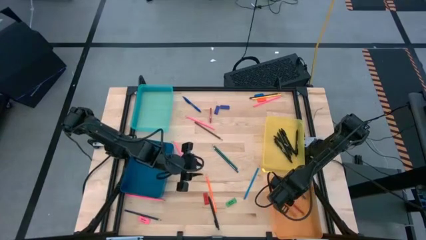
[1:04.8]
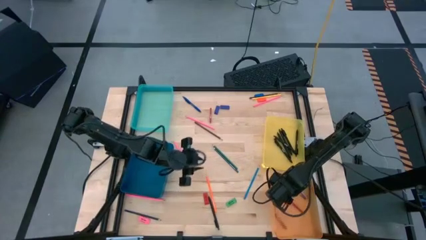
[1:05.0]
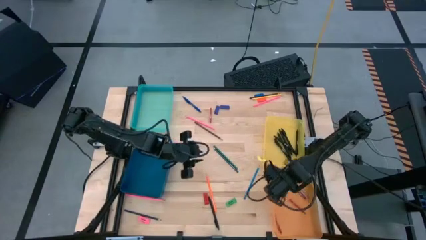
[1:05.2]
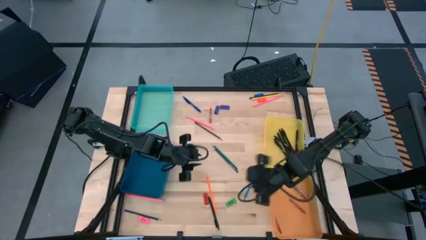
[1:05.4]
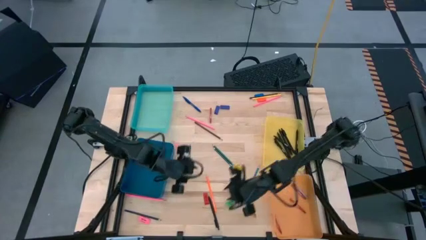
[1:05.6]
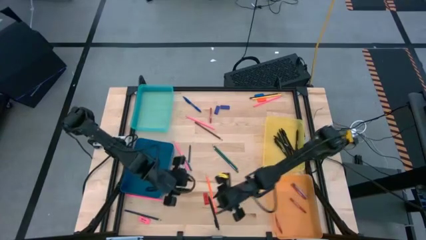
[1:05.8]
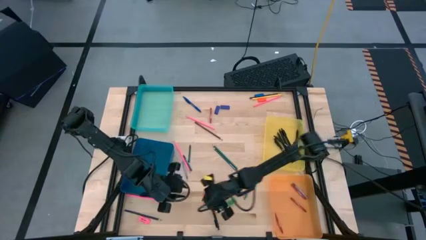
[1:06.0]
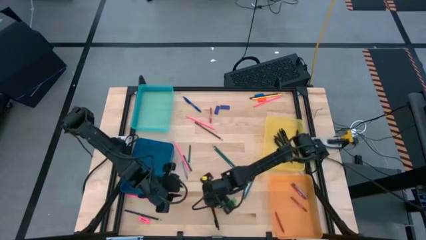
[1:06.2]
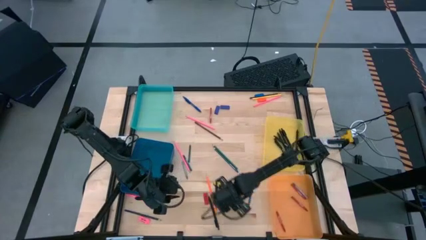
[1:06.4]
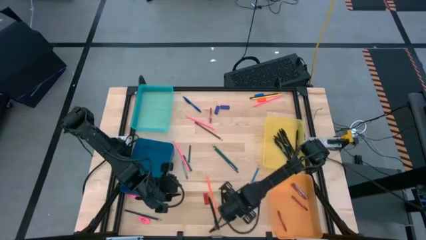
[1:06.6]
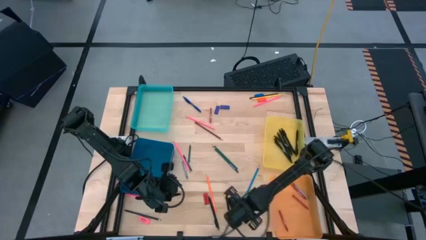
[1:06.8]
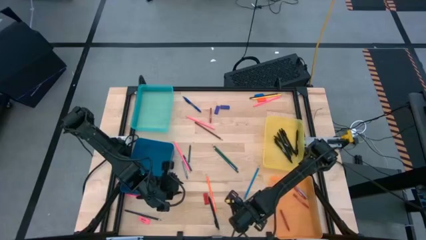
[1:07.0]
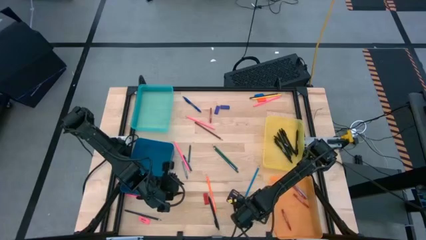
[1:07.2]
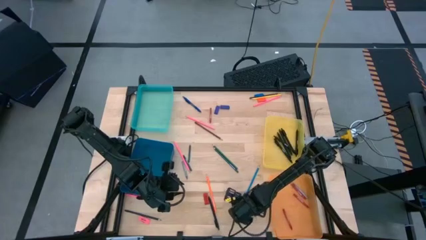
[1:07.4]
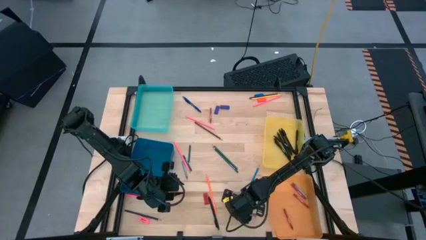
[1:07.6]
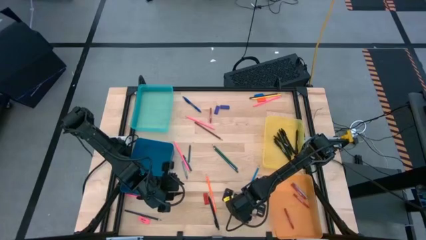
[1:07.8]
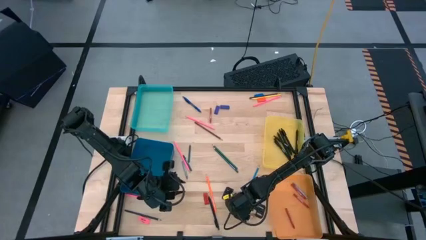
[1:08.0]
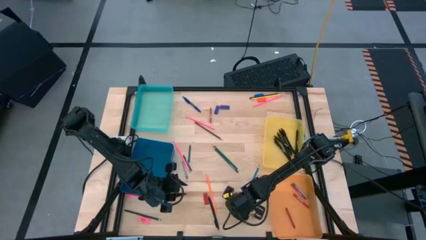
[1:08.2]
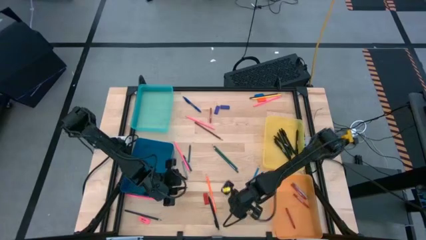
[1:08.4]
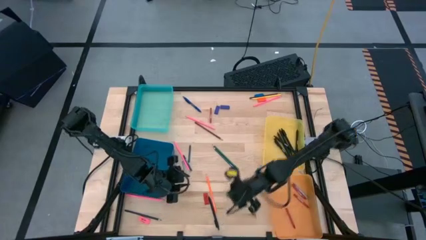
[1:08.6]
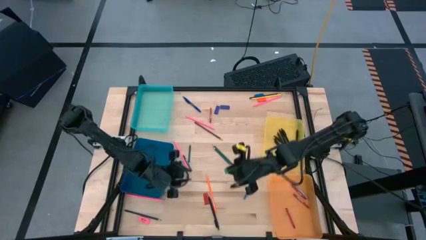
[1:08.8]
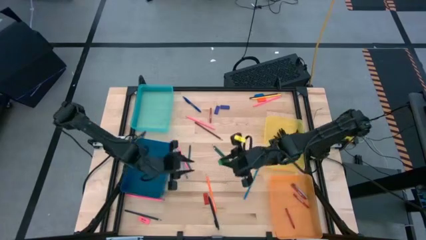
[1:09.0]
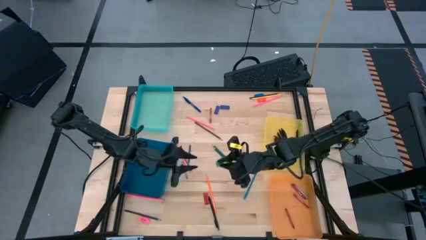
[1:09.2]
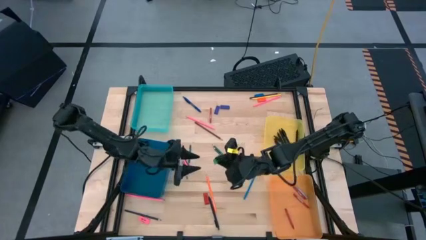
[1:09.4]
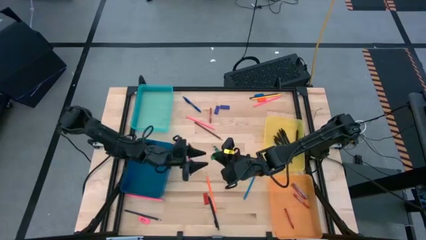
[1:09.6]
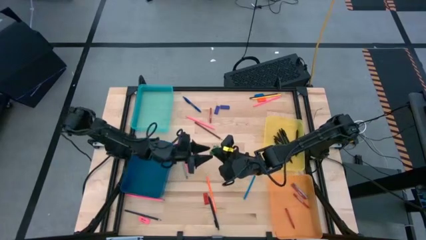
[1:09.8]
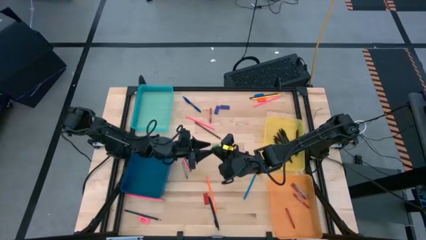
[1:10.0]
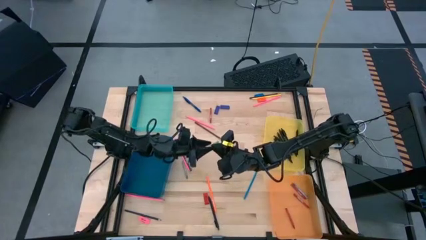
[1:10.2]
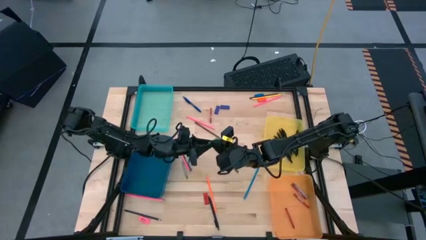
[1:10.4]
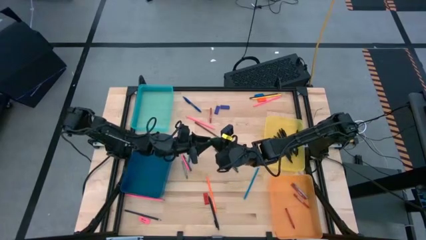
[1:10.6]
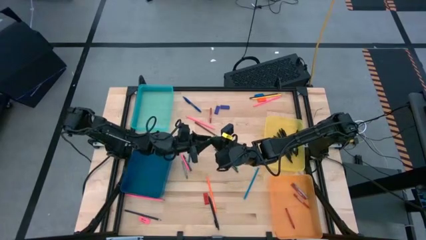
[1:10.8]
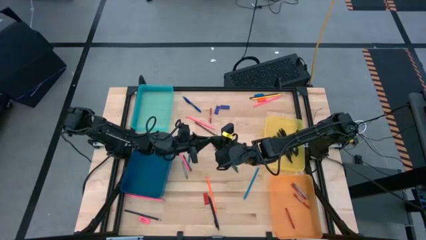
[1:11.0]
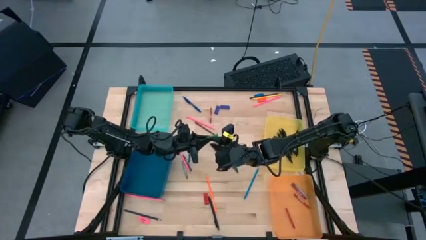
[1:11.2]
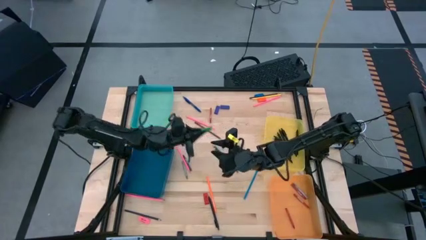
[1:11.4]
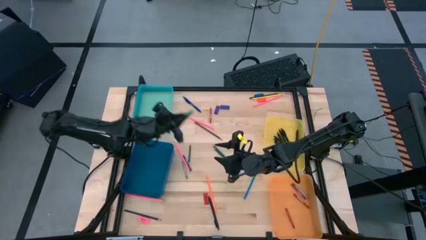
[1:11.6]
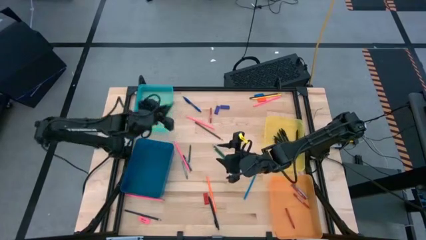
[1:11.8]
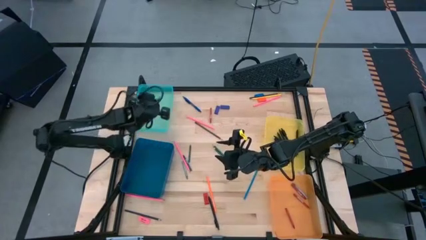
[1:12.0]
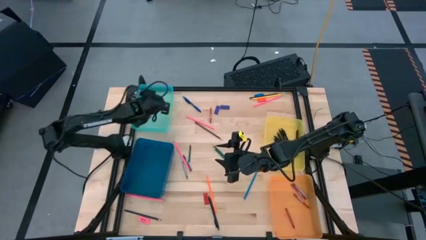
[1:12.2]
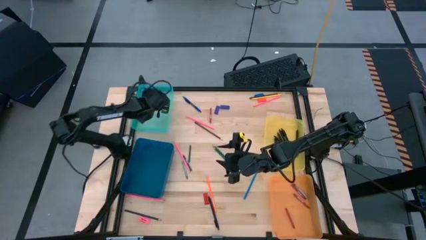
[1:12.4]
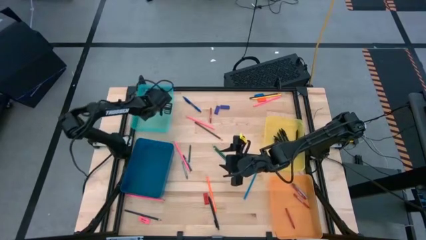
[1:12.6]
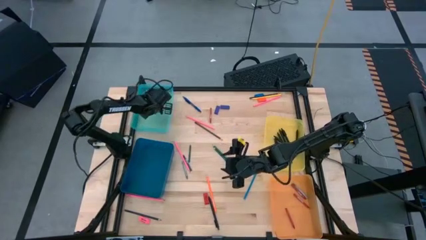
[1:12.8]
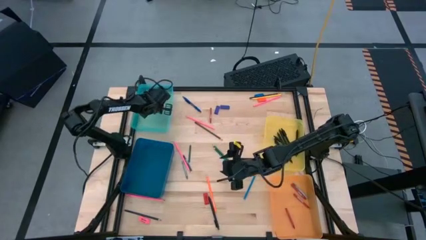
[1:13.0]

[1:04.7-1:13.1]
Task: Sort crayons/erasers/pens/pencils in bins
Put the green eraser into the light blue bin

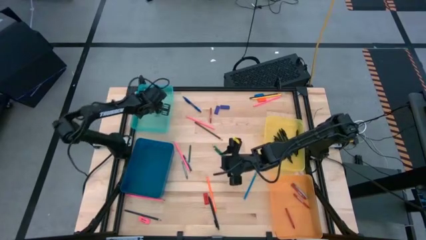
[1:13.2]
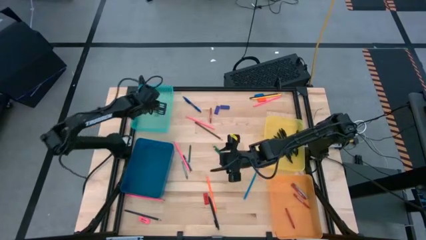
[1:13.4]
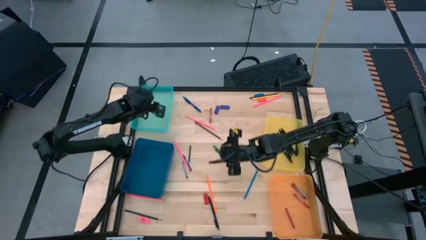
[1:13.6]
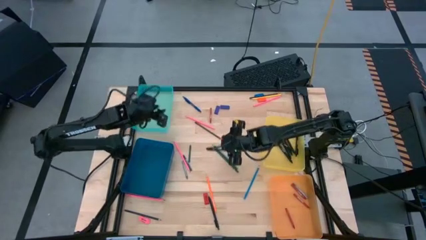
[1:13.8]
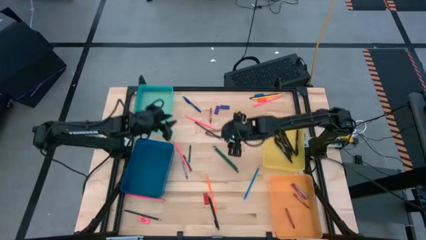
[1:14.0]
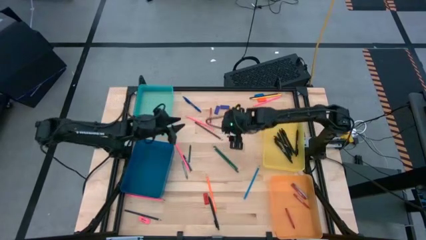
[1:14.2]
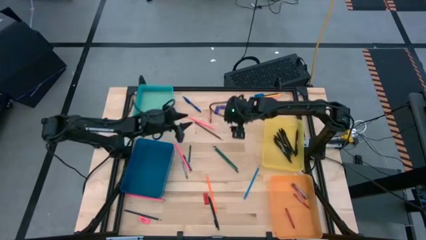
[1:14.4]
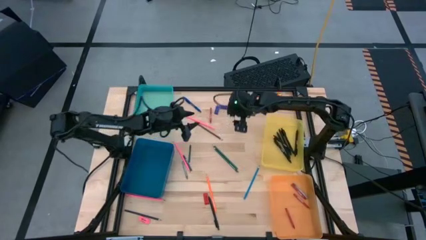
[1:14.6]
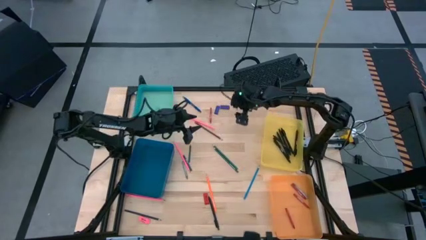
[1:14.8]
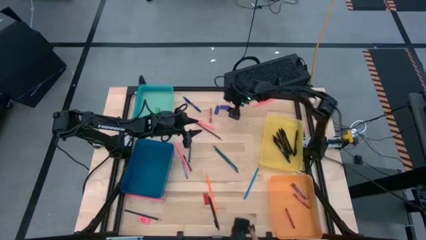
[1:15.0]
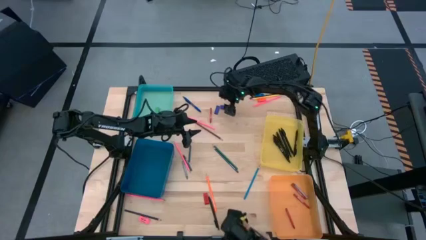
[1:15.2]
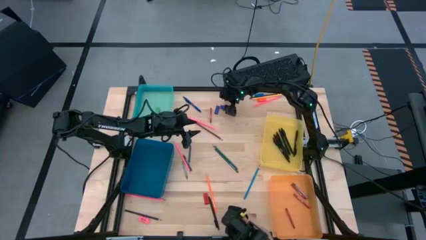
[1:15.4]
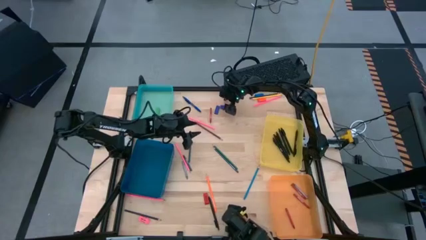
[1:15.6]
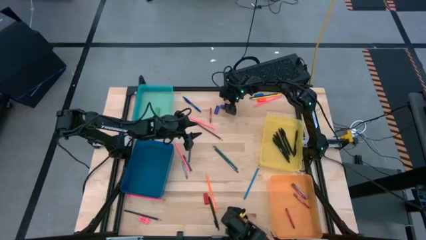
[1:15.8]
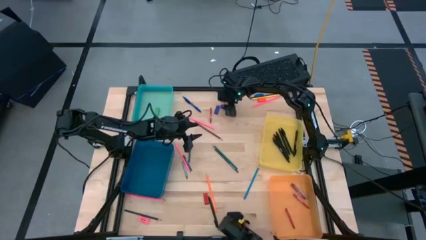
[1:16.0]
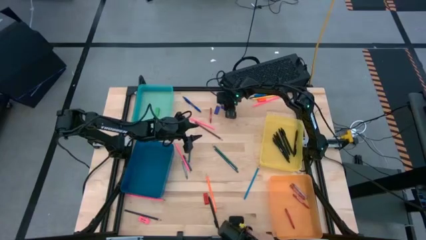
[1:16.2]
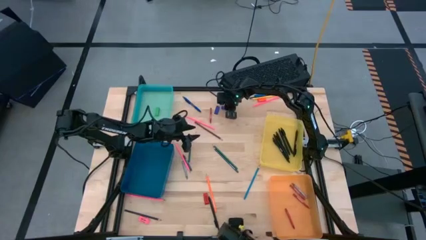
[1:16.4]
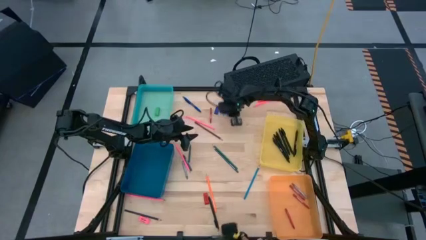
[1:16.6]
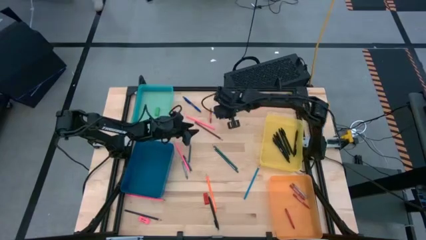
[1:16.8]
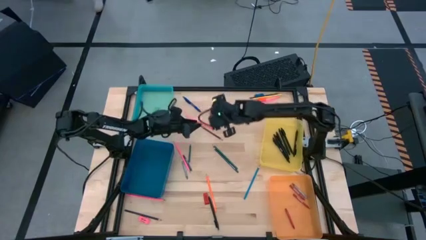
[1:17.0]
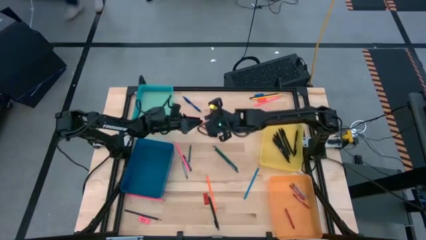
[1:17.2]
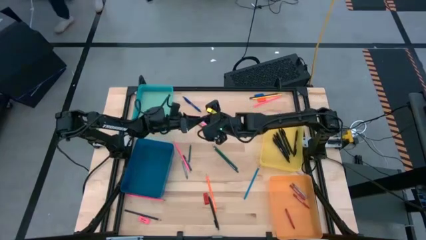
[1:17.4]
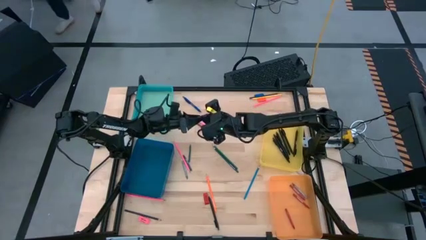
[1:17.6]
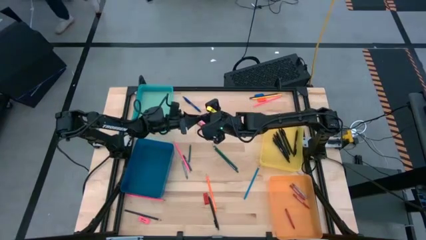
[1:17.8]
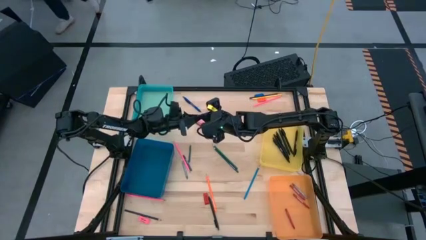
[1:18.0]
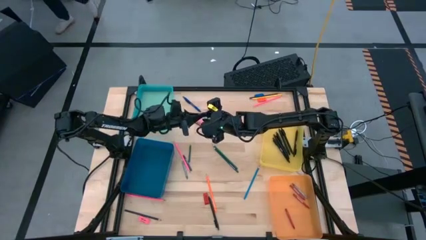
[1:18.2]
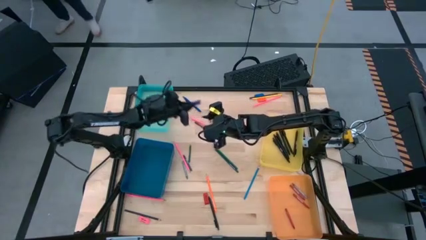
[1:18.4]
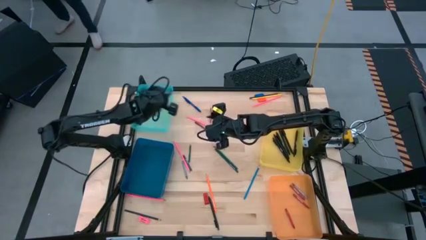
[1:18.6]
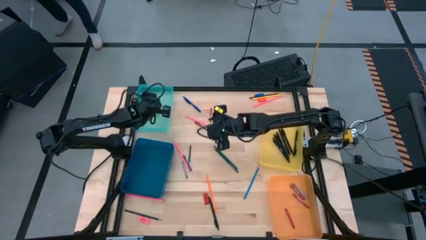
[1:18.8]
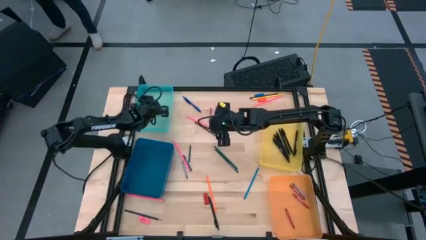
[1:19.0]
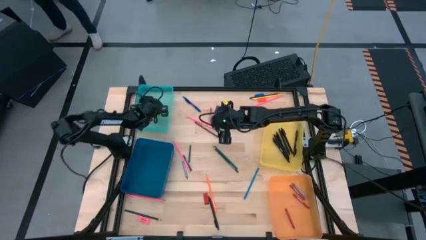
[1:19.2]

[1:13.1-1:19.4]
Put the blue eraser into the light blue bin

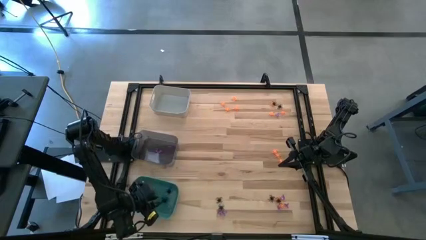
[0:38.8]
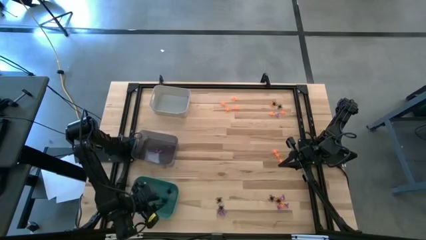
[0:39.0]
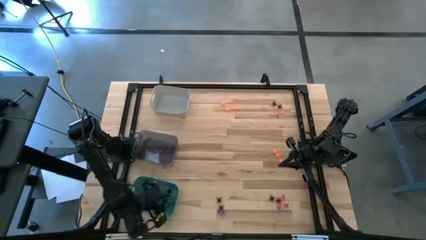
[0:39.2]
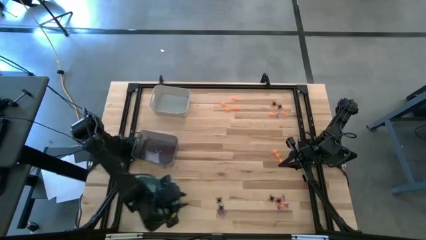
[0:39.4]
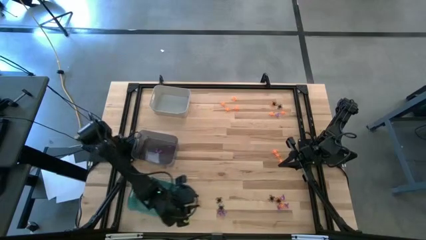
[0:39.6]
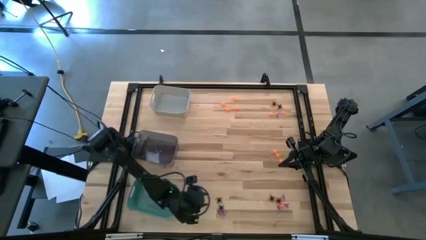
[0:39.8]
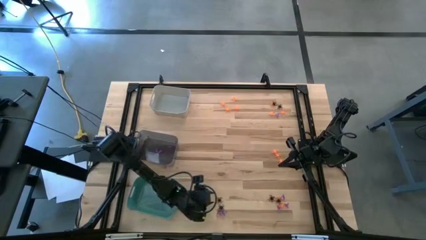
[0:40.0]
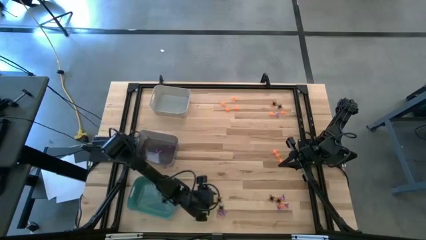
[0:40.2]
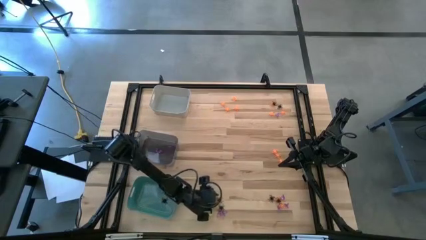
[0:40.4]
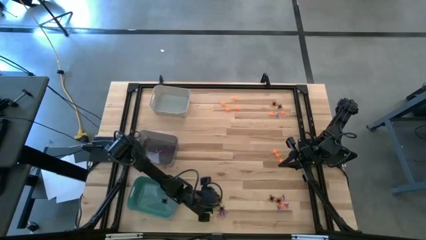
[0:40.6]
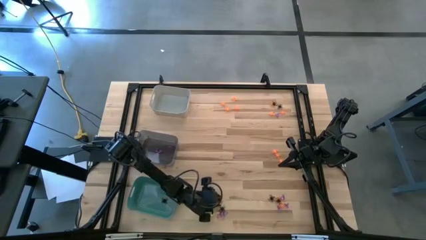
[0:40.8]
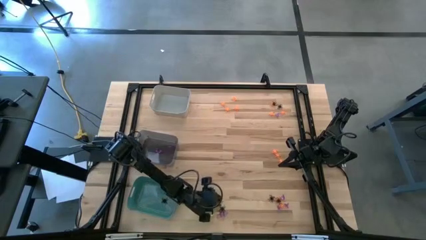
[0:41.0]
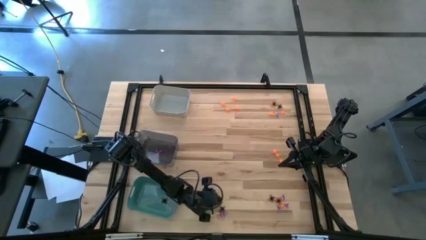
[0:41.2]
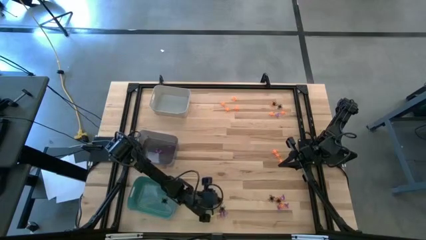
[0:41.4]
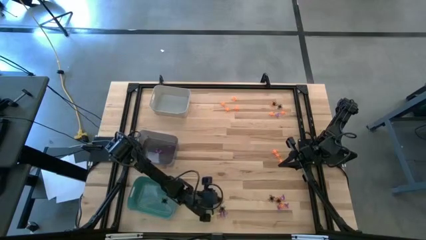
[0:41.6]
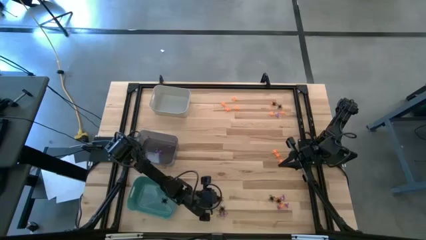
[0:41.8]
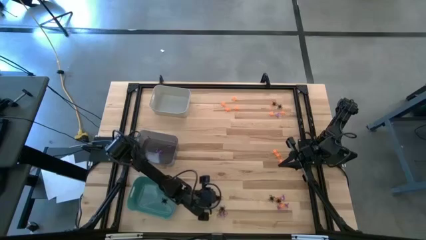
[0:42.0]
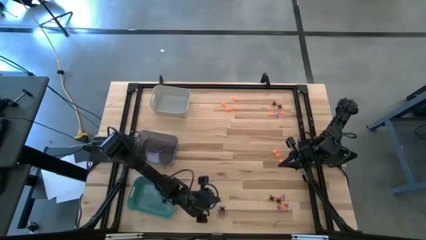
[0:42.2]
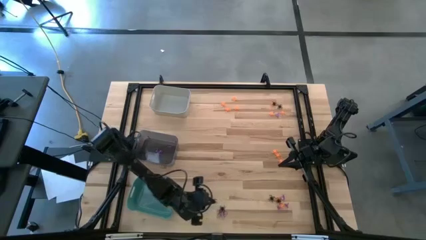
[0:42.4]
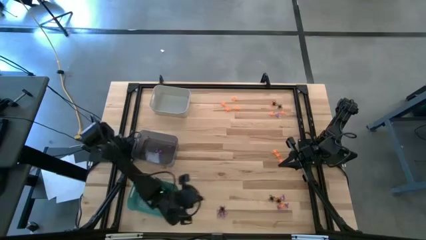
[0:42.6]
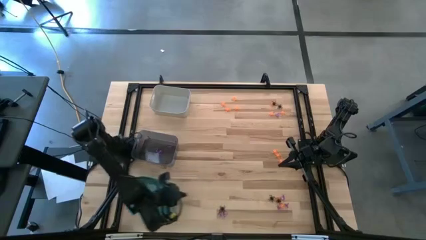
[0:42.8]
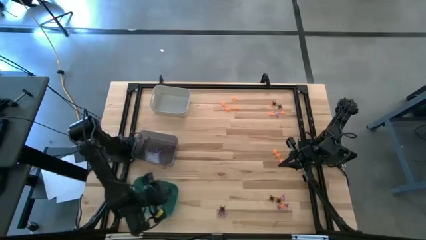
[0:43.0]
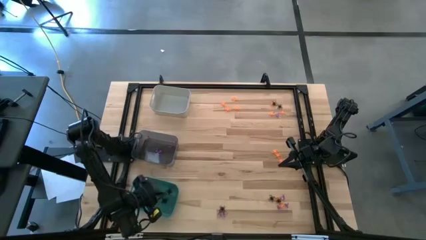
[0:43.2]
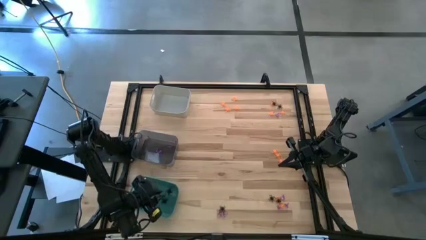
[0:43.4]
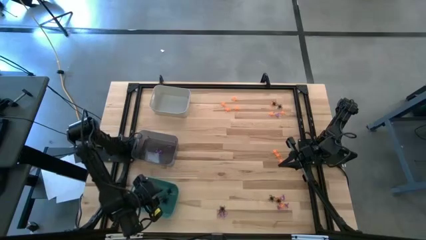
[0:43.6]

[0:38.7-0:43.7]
Task: Sort Halloween decoration
Put the bottom center black spider into the green bin
